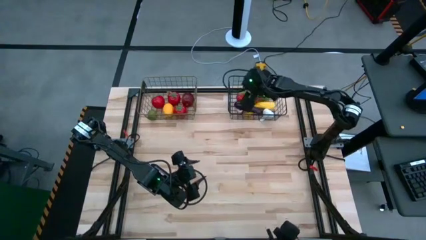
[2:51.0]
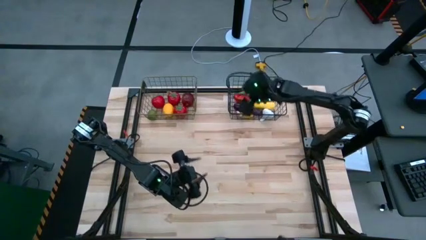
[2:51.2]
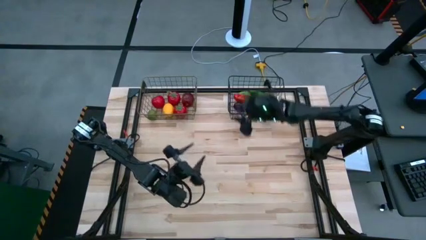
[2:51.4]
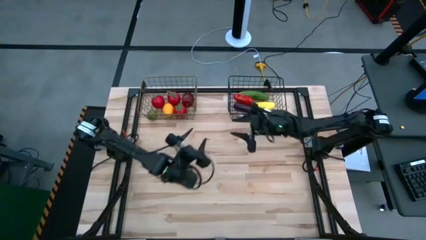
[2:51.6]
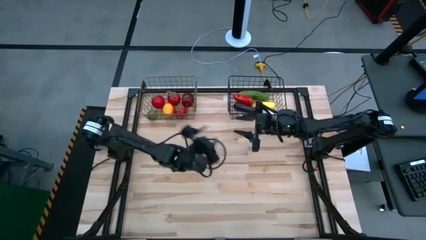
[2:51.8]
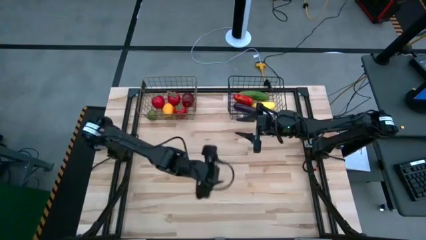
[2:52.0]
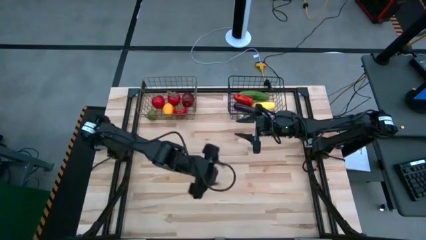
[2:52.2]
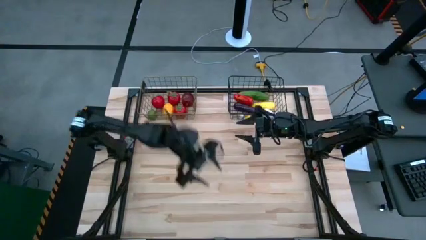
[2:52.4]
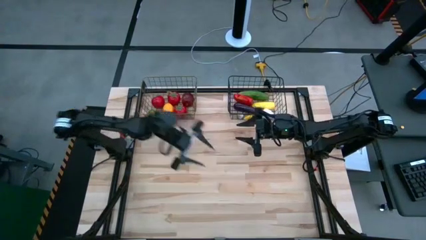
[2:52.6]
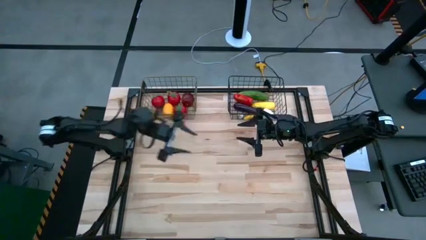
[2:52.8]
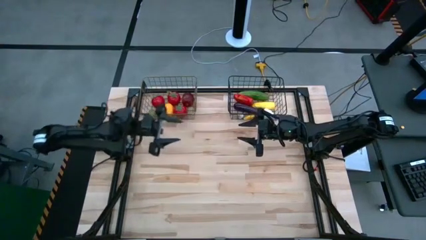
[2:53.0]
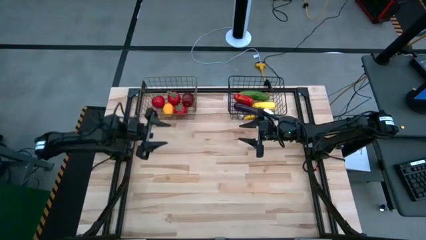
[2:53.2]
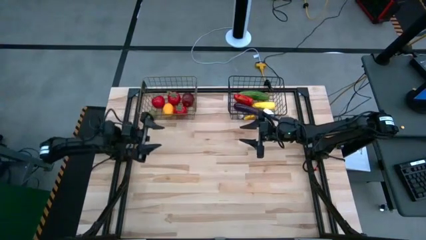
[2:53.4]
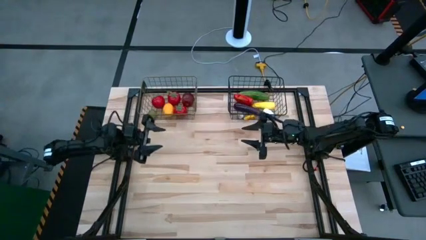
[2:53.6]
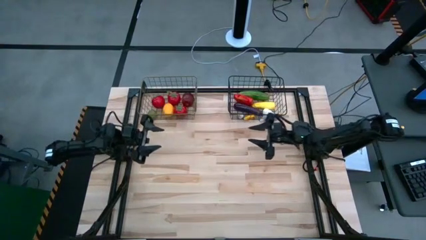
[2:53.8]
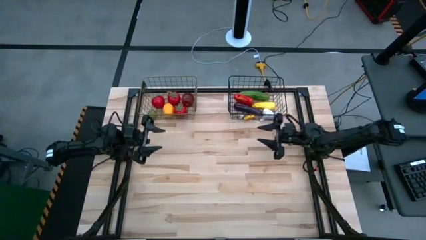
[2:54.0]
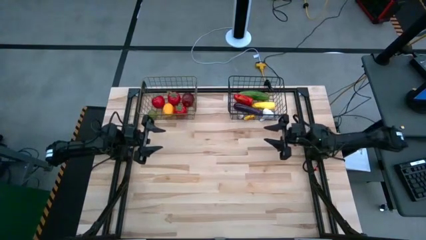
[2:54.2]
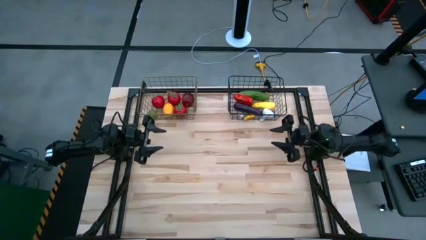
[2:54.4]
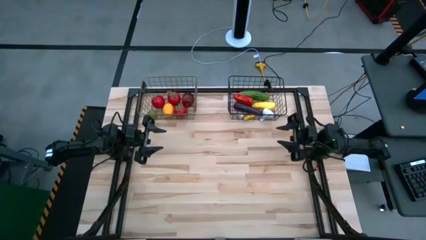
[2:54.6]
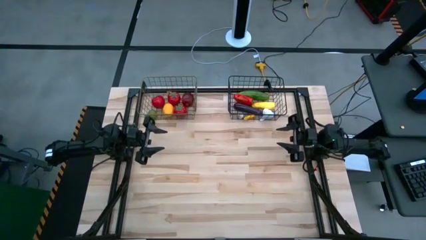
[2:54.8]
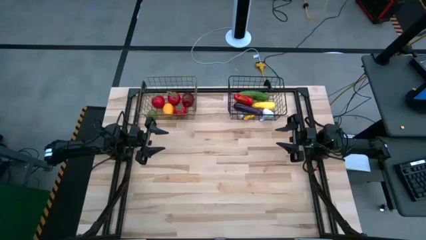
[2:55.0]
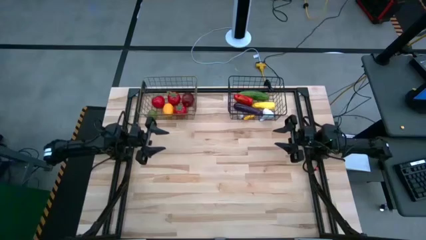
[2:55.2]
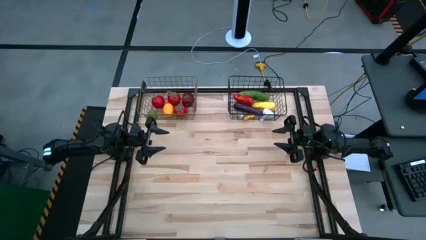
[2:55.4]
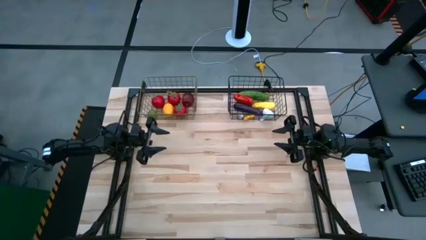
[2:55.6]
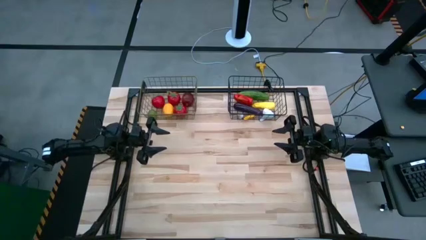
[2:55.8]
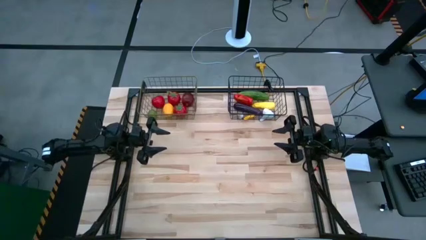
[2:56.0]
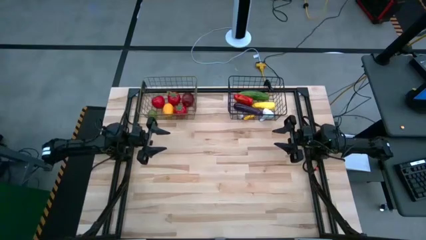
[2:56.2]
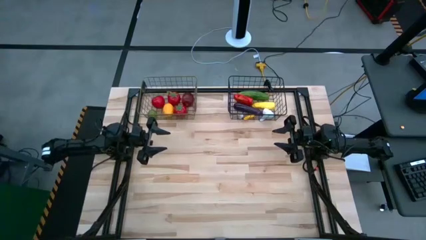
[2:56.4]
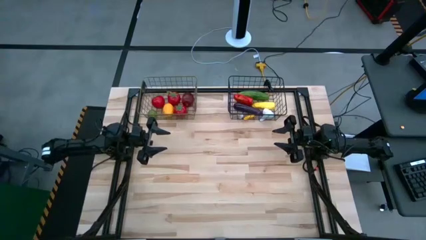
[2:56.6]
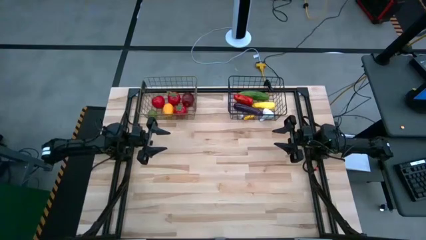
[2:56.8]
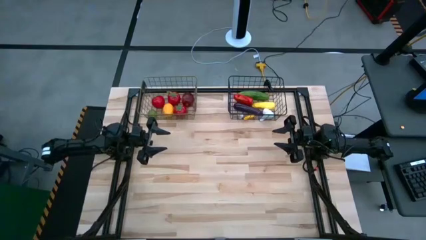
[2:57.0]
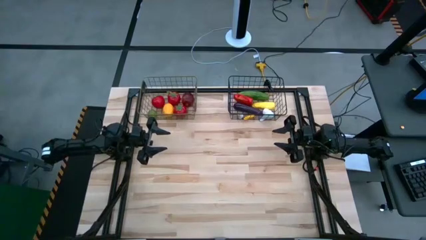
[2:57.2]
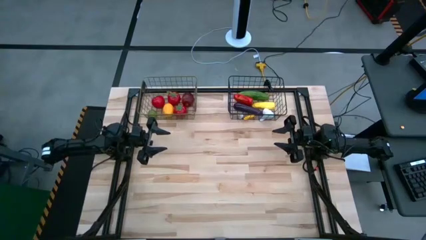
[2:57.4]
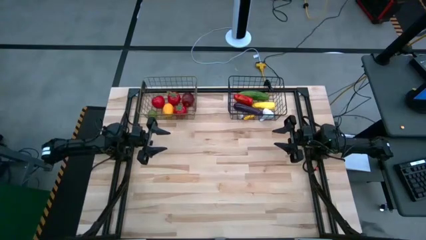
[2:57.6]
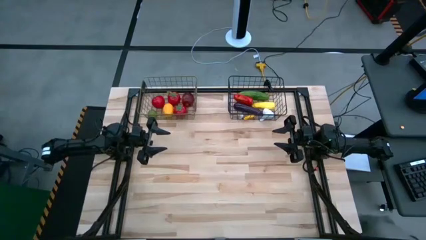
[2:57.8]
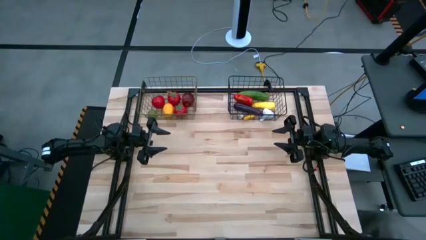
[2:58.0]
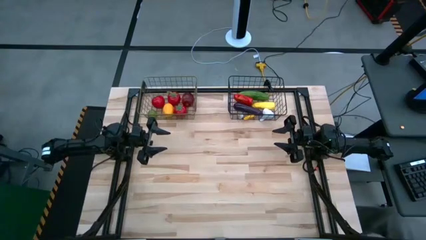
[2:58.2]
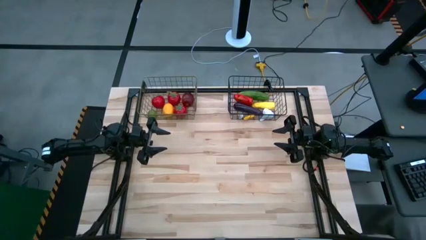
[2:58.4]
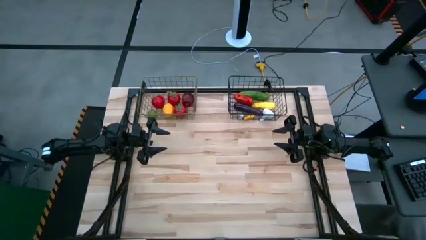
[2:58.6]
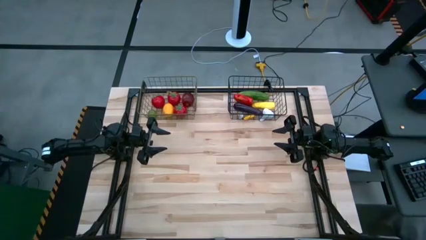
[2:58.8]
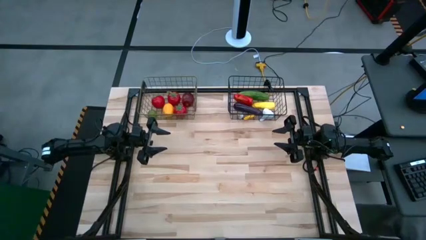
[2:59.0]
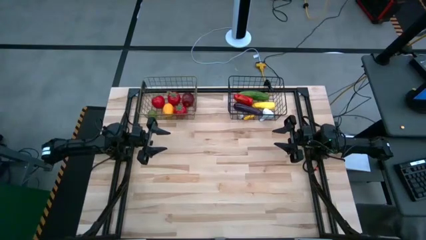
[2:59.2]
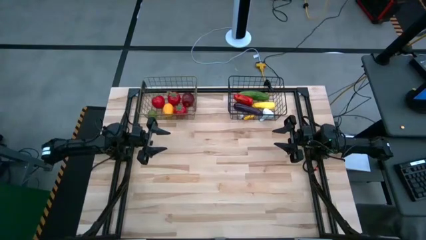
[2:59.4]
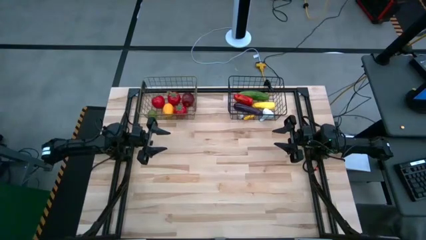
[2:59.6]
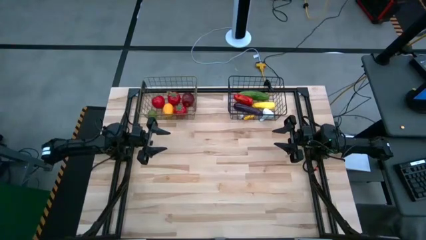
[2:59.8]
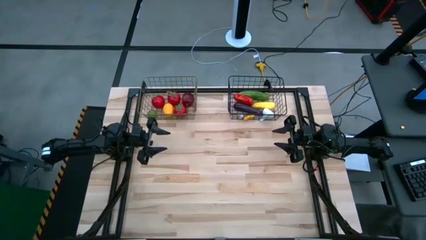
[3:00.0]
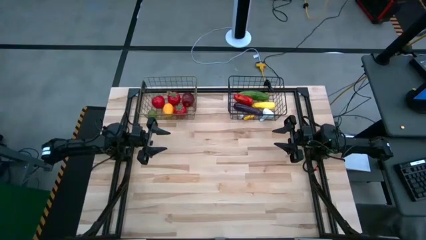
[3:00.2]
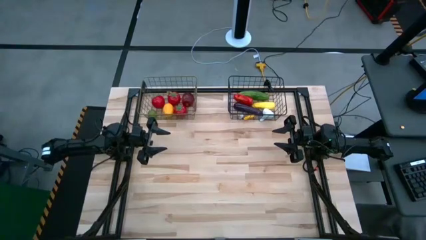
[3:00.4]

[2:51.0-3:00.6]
Task: Sort produce into baskets
Return to Home Position

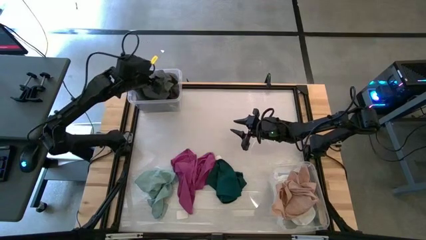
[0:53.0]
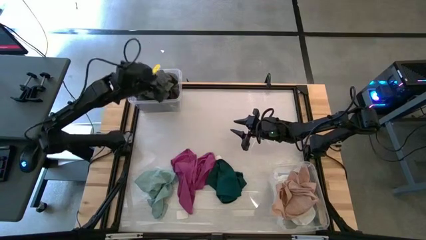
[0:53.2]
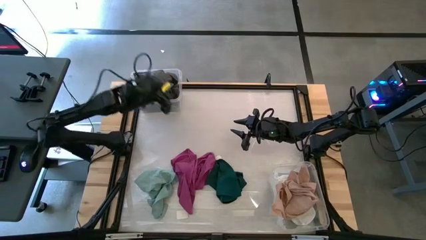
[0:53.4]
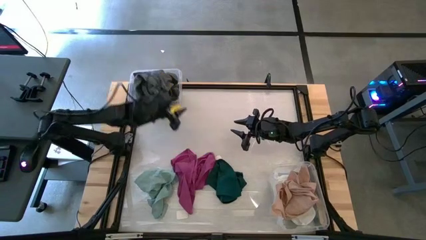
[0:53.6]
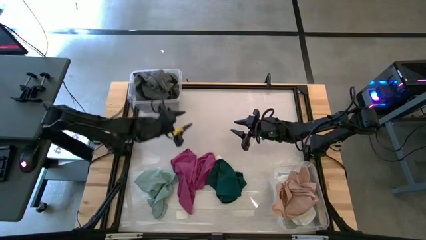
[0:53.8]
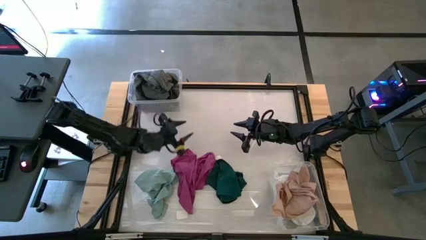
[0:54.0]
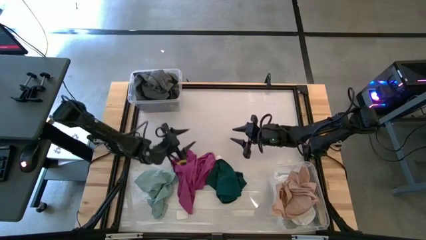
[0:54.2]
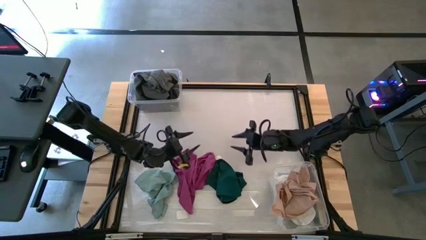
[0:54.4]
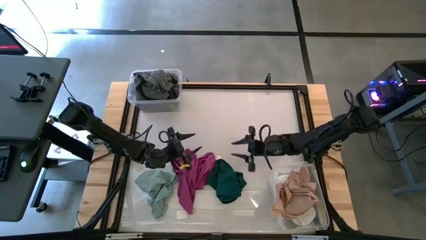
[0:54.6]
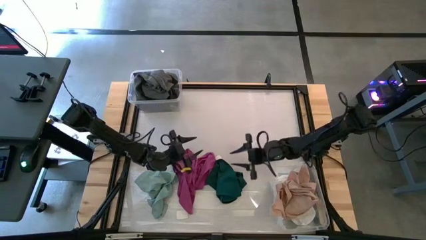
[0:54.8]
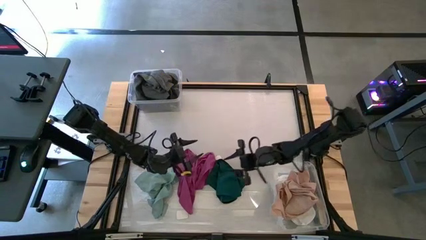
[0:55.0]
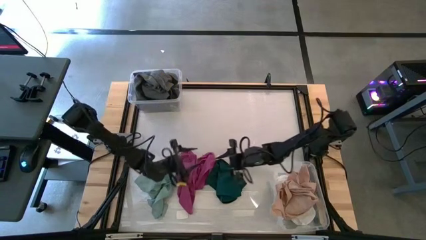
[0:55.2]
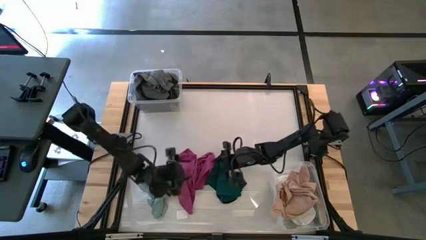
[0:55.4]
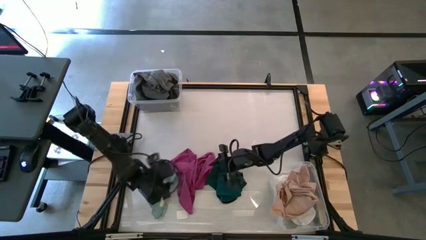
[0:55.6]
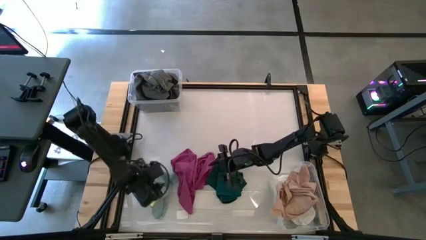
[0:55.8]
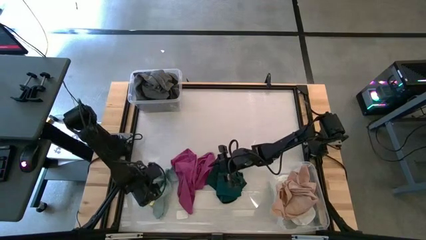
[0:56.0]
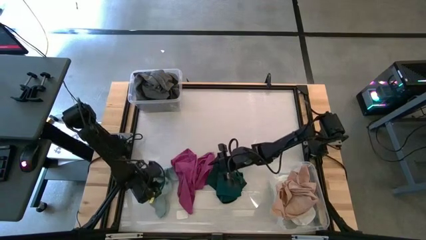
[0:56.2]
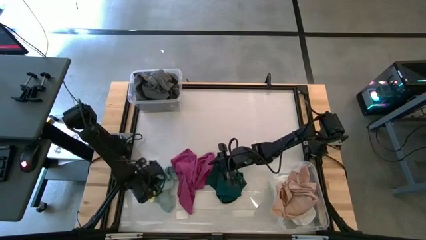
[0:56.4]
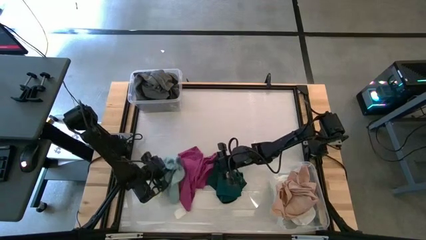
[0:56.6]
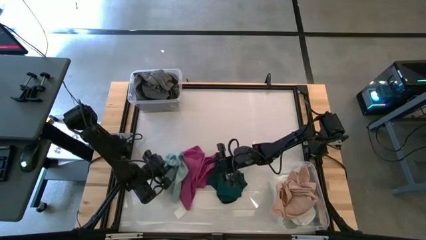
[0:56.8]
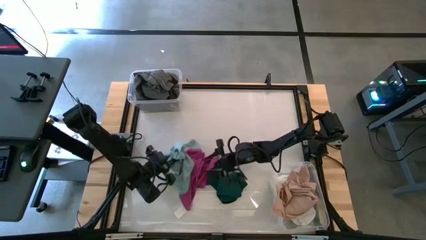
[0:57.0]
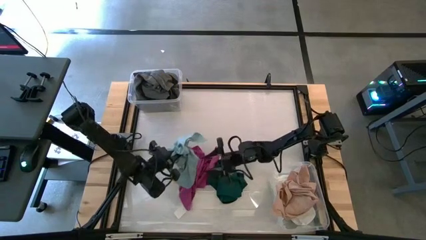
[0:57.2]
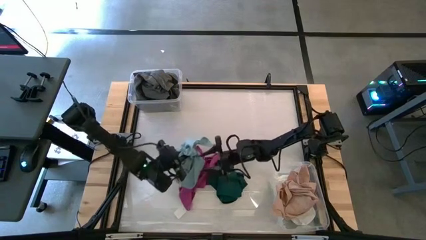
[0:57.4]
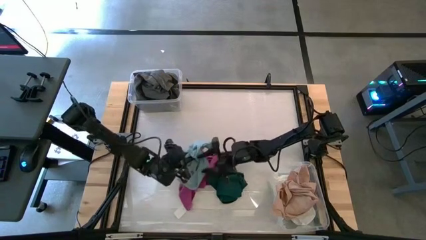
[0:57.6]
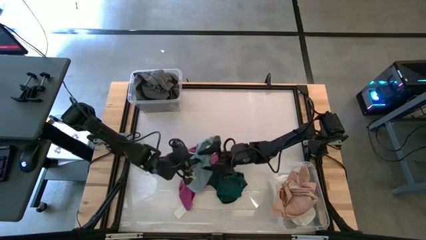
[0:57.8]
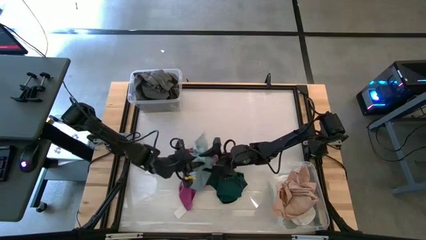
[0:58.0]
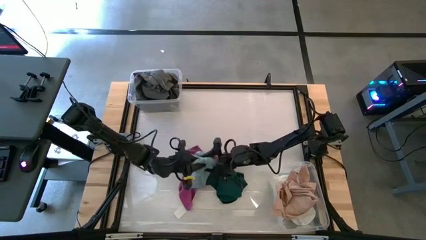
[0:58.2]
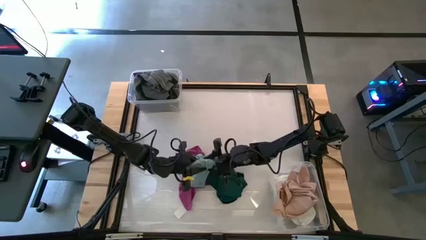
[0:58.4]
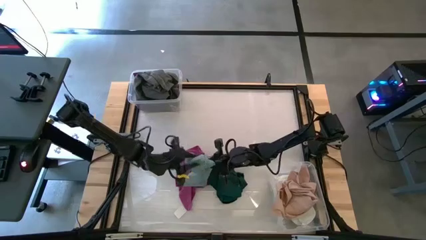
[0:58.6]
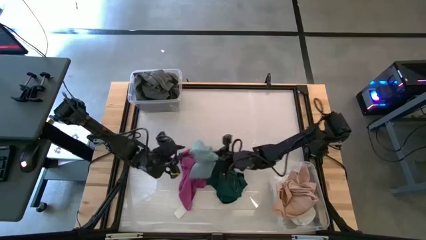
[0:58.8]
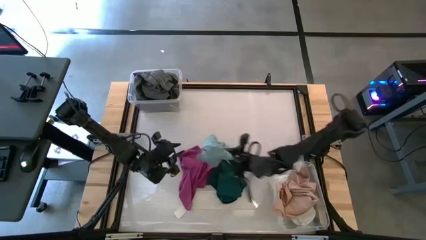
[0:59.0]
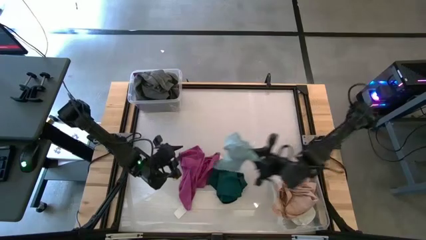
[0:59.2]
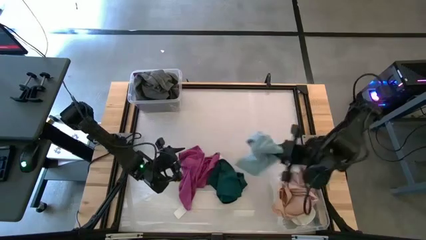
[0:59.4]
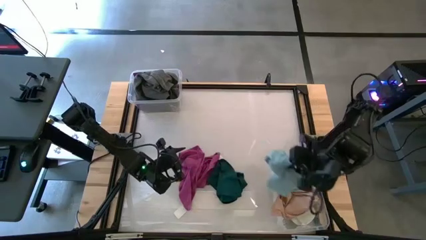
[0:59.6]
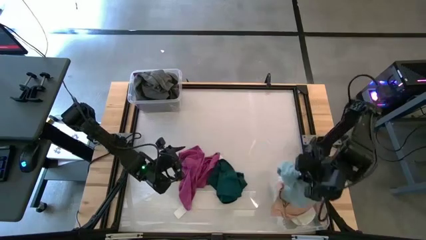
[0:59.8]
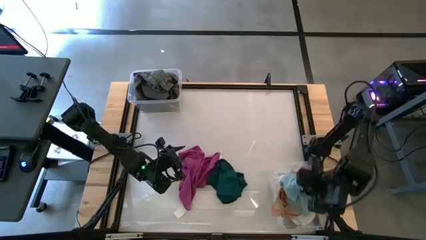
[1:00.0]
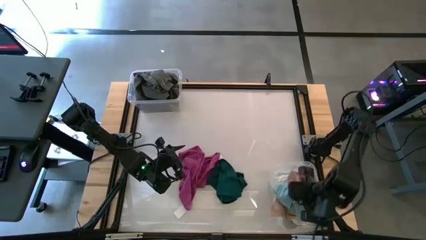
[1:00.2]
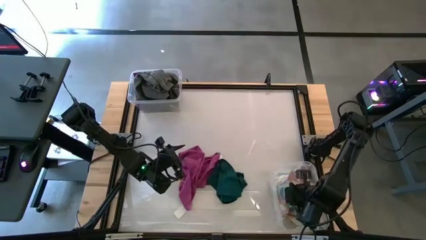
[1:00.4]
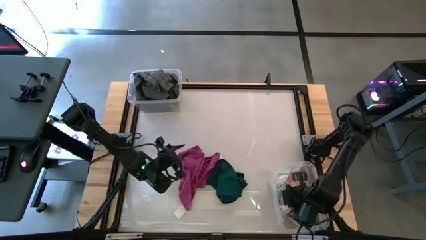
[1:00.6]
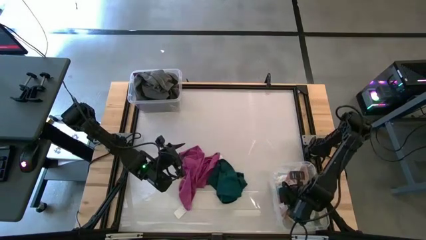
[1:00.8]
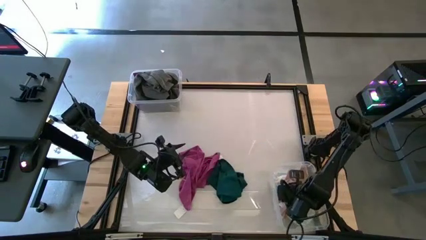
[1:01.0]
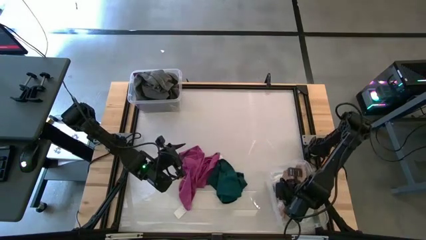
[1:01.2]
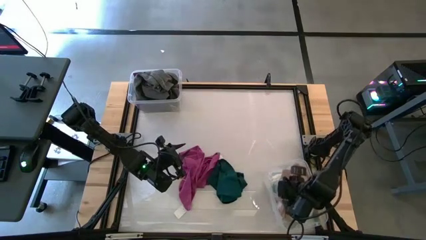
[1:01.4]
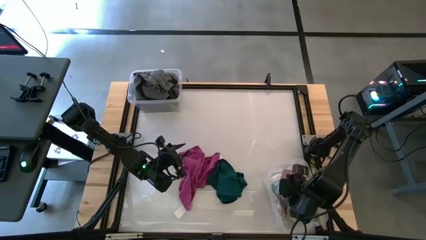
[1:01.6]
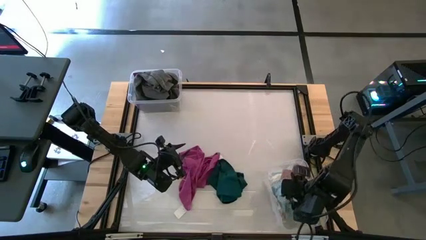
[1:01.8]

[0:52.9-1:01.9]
Task: Sort microfiber towel by color & place in baskets
Put the light blue towel into the bottom transparent bin
